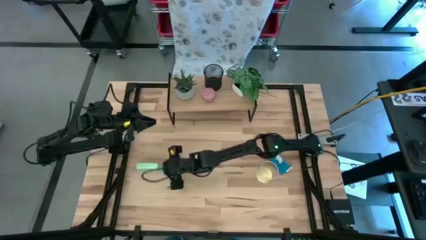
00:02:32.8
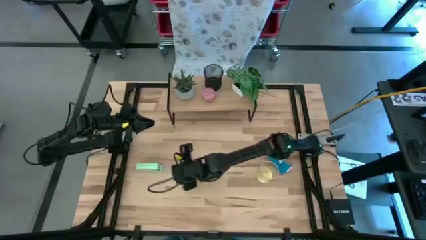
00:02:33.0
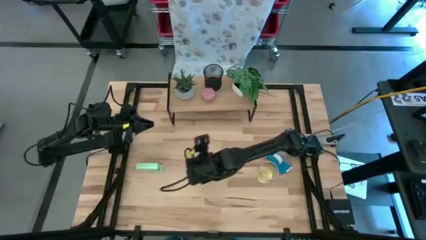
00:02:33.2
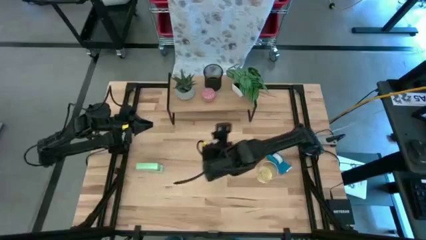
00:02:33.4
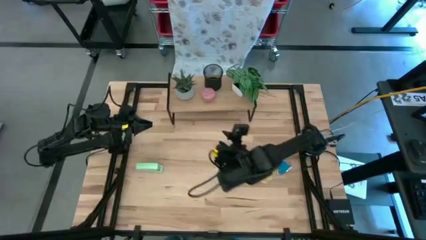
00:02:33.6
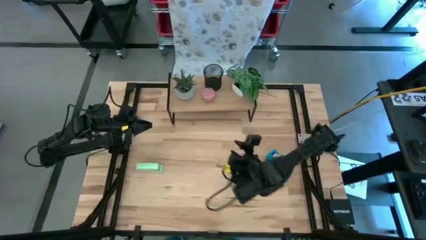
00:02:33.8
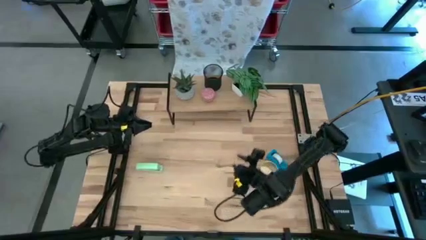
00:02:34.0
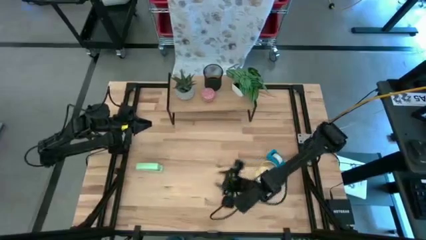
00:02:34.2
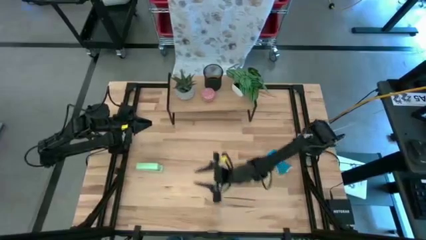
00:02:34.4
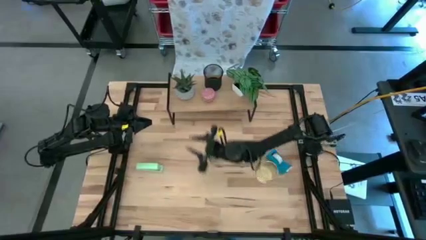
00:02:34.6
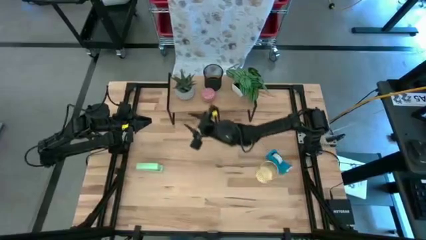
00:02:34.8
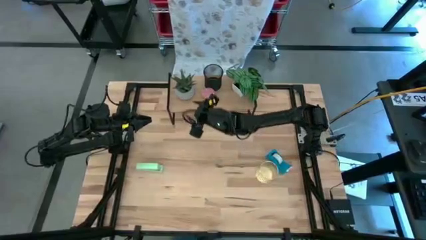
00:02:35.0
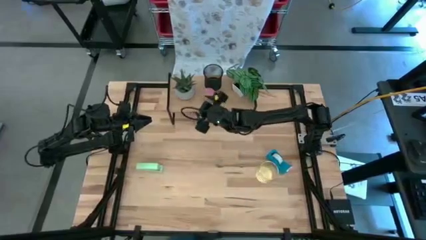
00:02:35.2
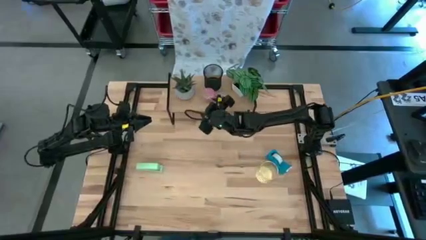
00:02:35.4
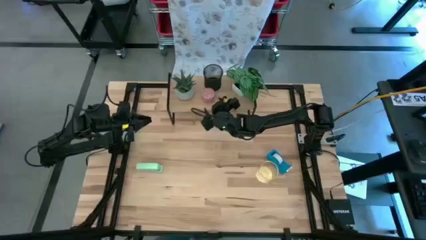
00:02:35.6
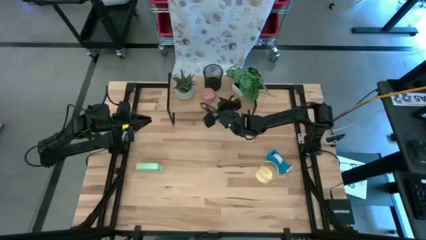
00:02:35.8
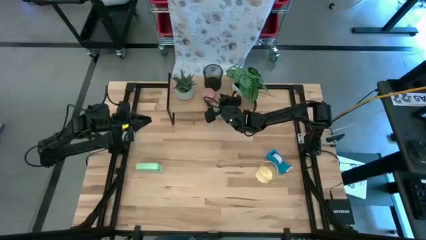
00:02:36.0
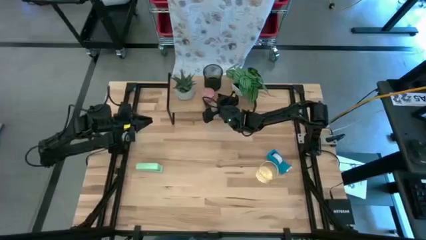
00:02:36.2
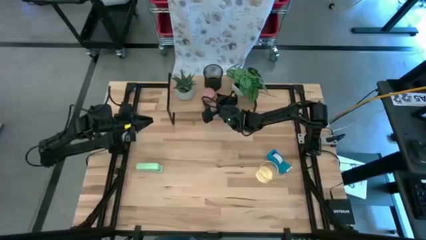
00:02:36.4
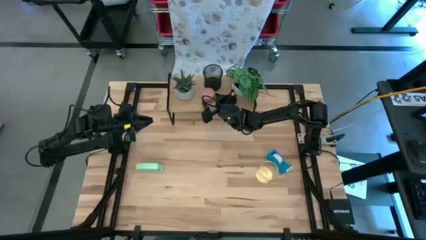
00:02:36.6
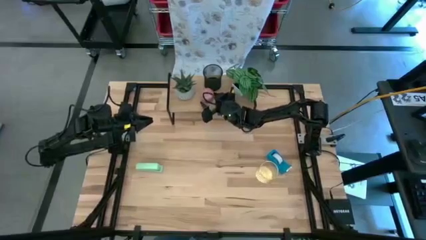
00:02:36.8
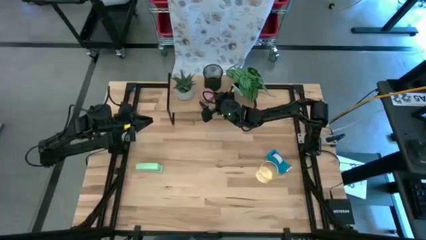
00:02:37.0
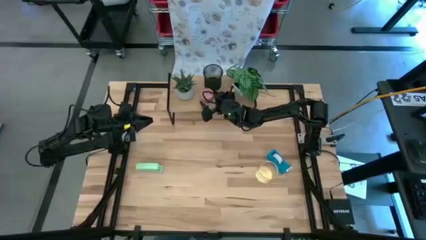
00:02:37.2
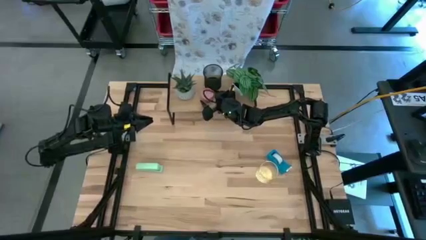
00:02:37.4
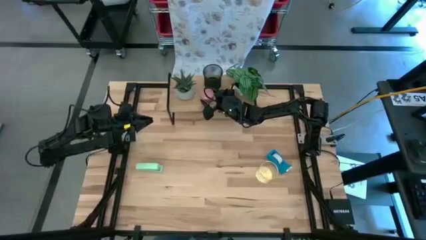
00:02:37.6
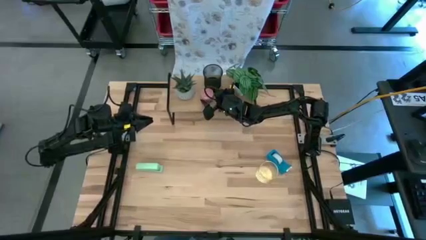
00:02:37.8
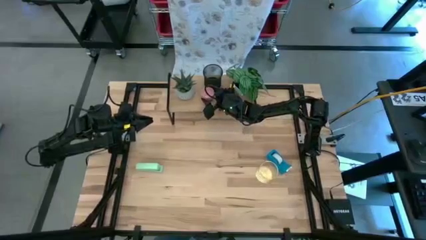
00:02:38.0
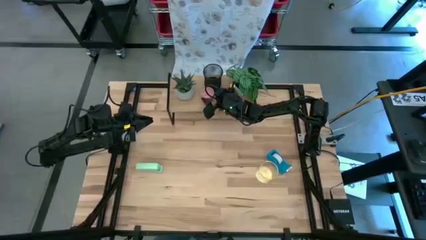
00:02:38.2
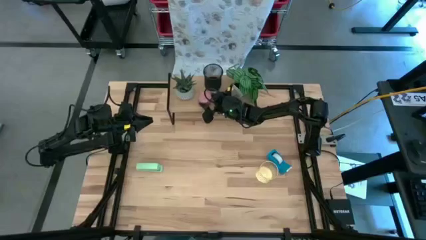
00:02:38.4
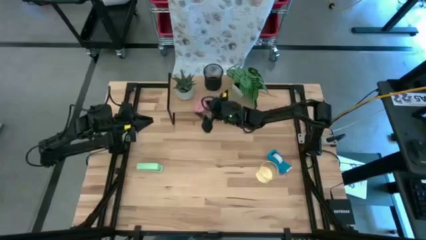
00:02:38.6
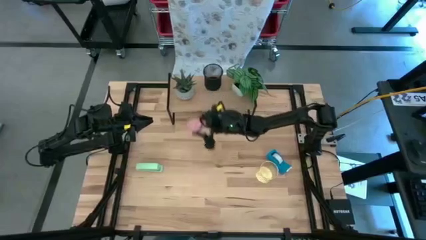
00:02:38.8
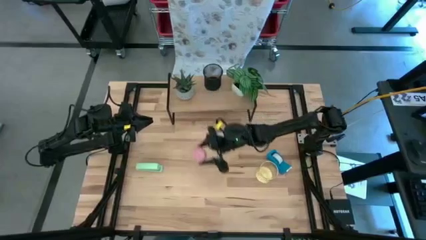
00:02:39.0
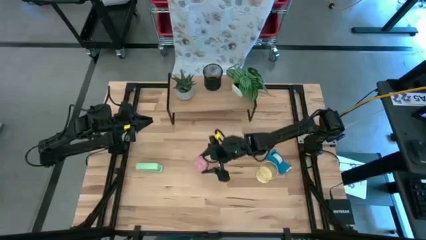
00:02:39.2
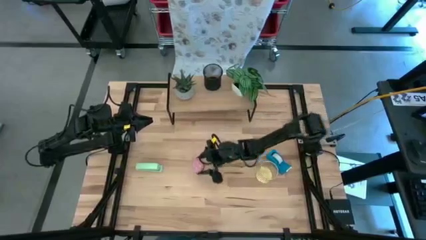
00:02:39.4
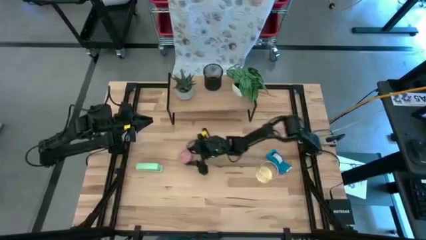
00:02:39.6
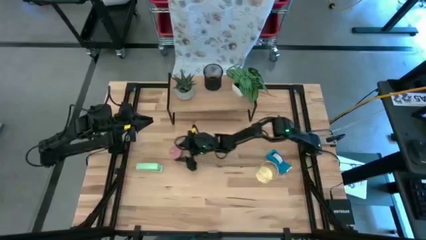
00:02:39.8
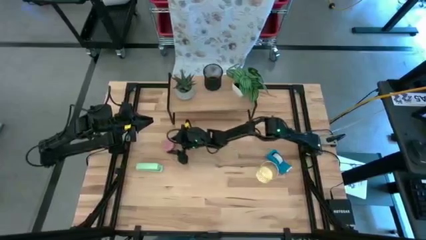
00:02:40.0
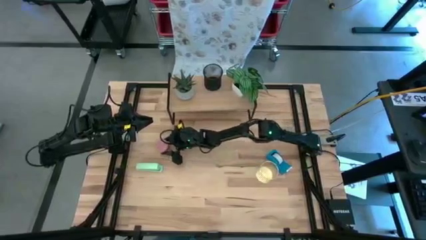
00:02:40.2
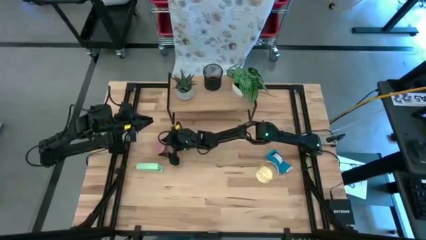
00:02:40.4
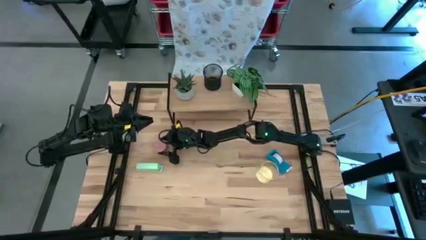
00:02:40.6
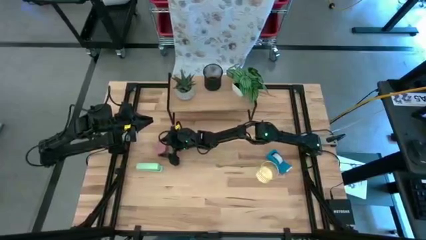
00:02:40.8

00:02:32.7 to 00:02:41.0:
Task: Stock shelves
Remove the pink scented candle on the shelf

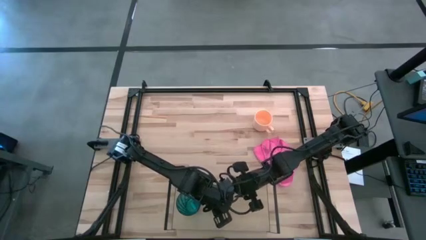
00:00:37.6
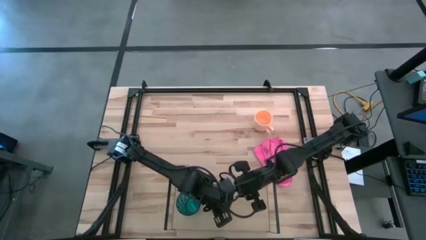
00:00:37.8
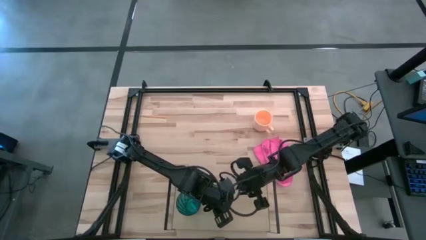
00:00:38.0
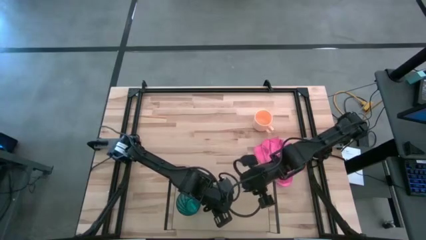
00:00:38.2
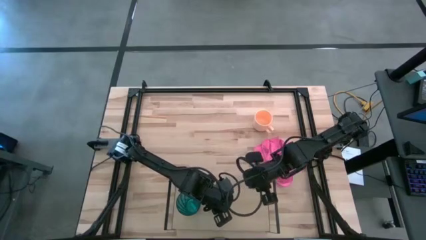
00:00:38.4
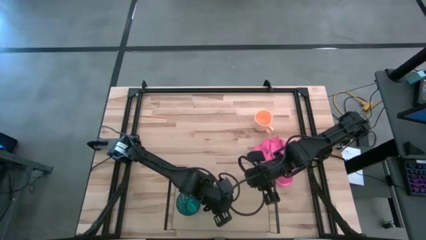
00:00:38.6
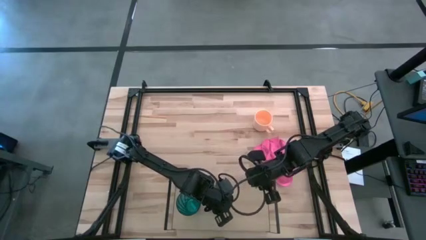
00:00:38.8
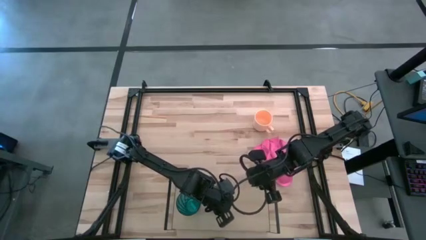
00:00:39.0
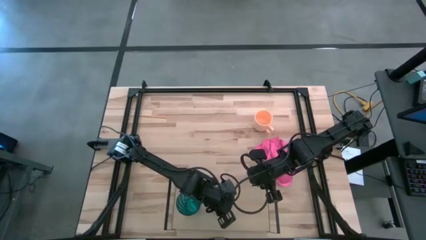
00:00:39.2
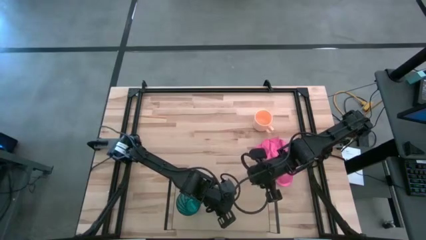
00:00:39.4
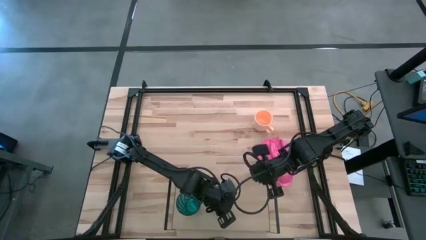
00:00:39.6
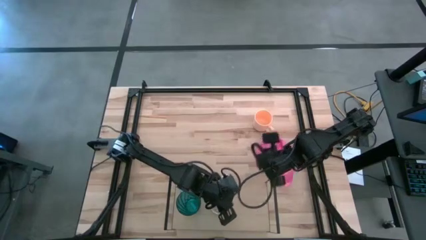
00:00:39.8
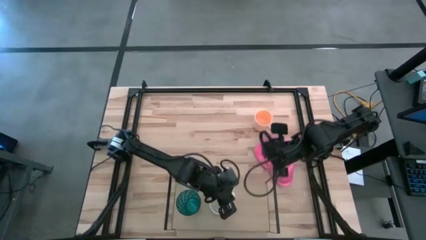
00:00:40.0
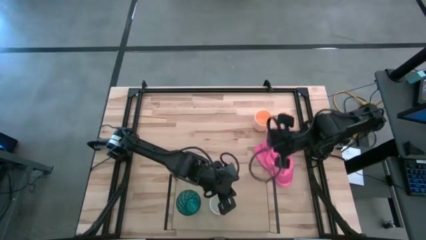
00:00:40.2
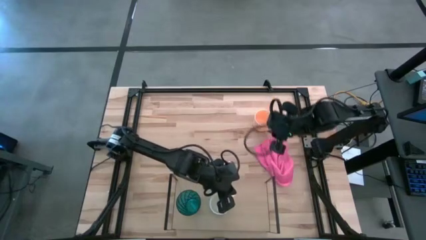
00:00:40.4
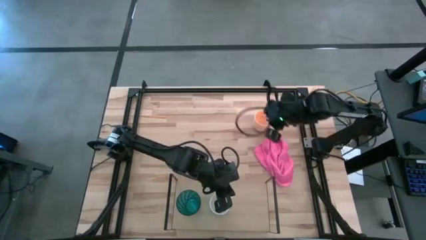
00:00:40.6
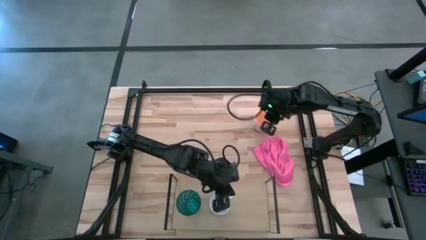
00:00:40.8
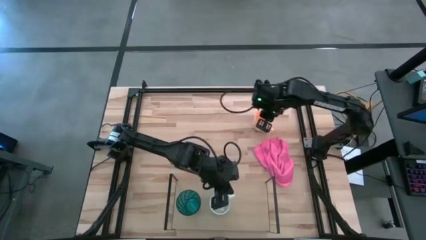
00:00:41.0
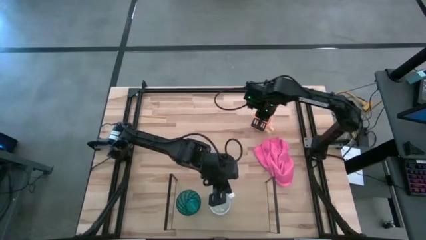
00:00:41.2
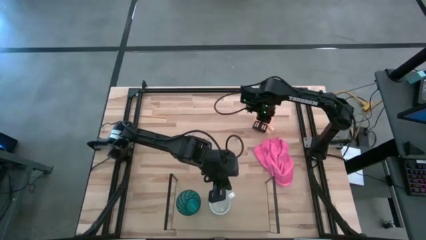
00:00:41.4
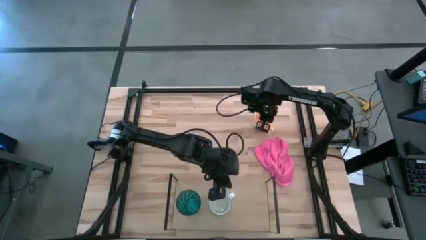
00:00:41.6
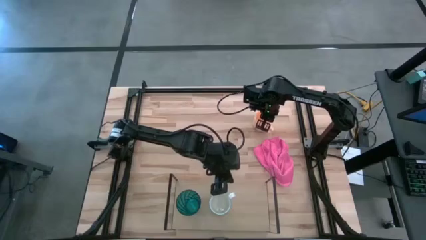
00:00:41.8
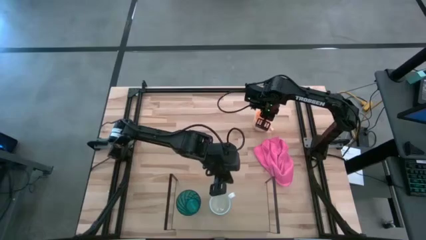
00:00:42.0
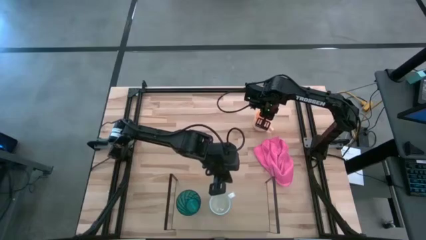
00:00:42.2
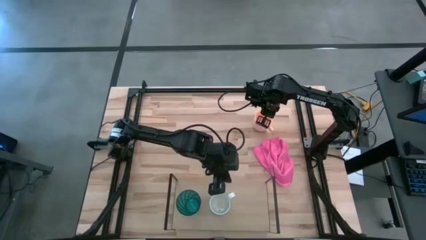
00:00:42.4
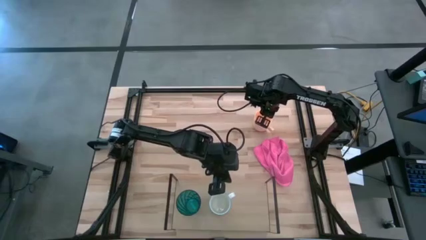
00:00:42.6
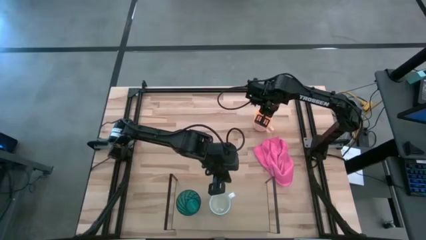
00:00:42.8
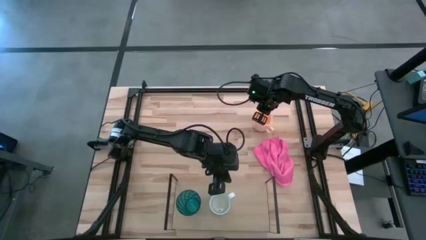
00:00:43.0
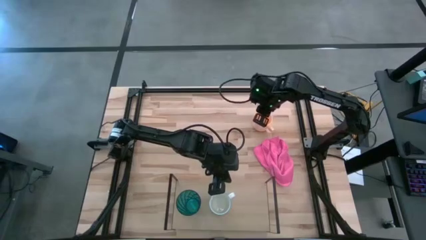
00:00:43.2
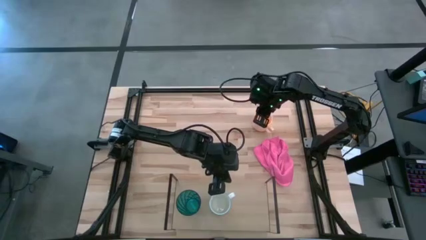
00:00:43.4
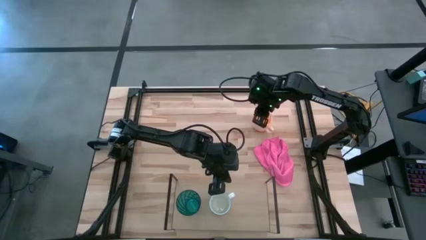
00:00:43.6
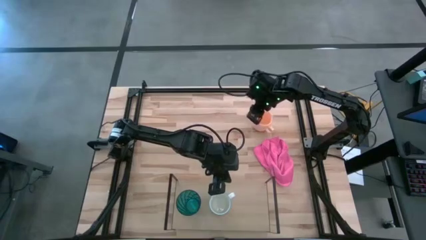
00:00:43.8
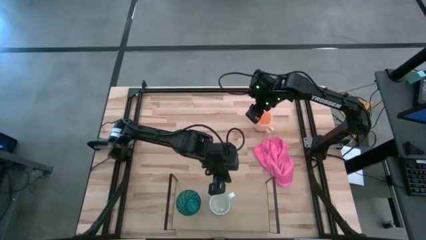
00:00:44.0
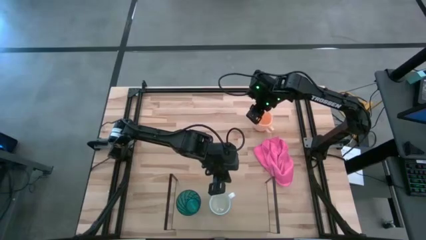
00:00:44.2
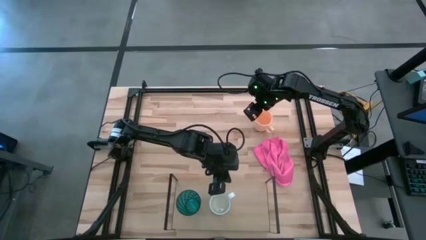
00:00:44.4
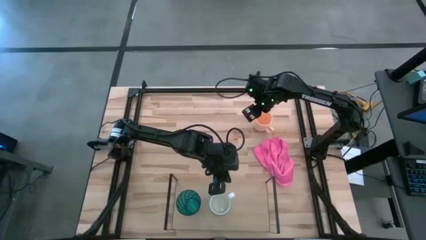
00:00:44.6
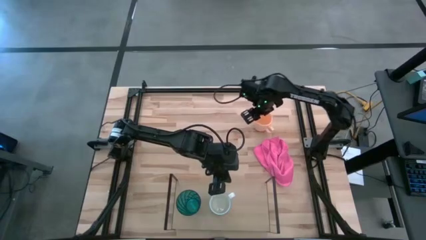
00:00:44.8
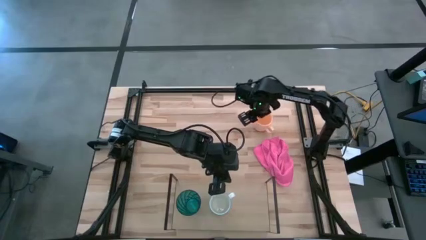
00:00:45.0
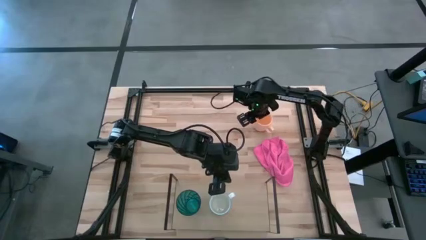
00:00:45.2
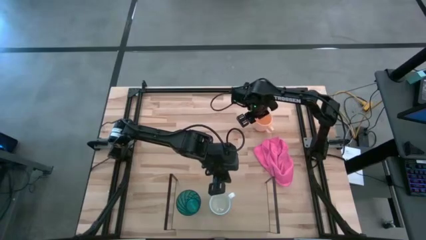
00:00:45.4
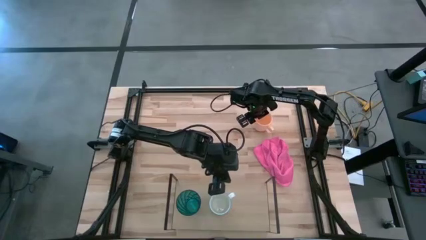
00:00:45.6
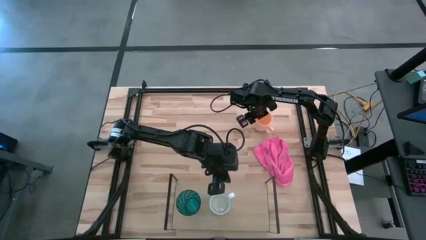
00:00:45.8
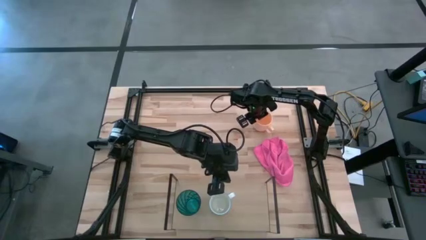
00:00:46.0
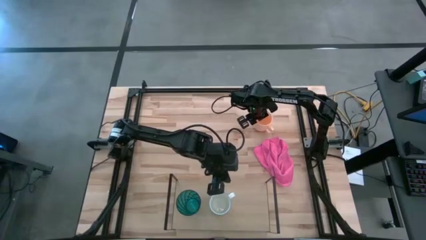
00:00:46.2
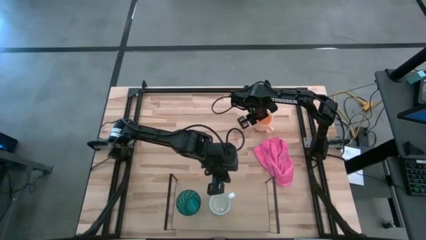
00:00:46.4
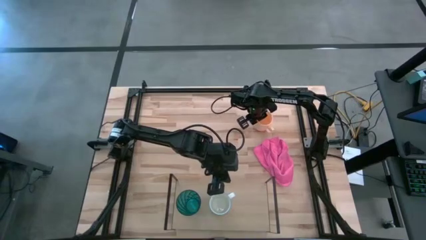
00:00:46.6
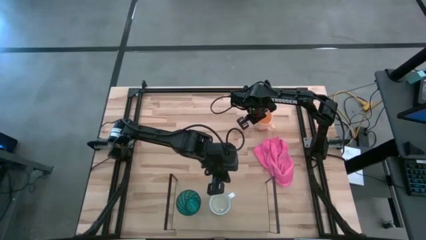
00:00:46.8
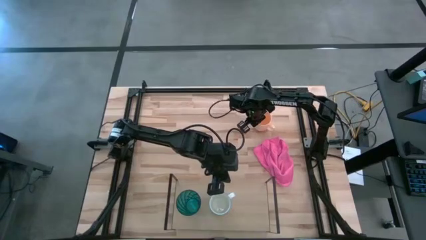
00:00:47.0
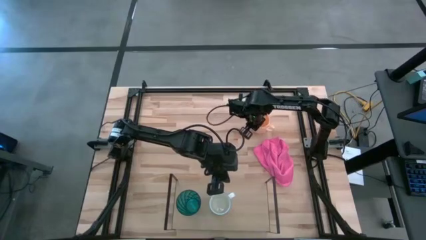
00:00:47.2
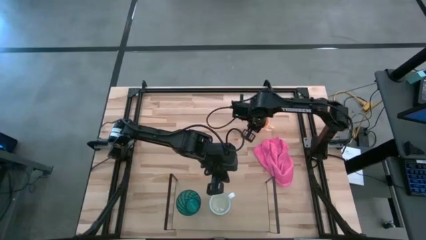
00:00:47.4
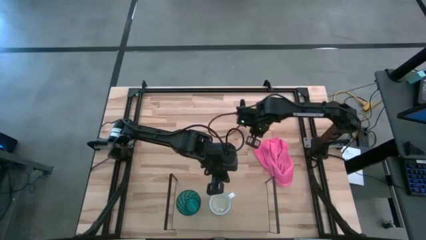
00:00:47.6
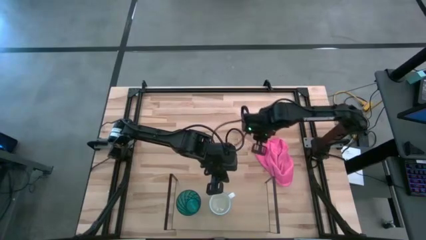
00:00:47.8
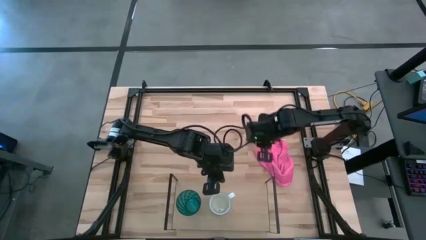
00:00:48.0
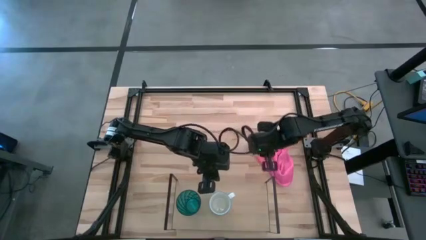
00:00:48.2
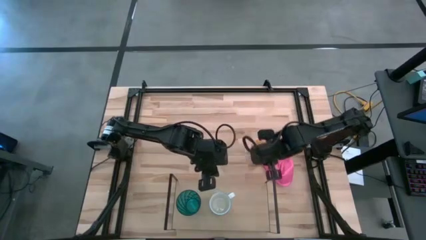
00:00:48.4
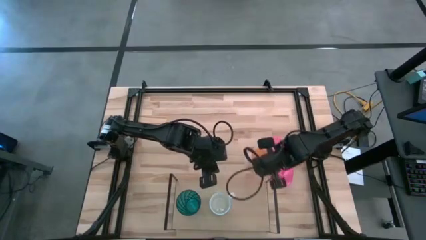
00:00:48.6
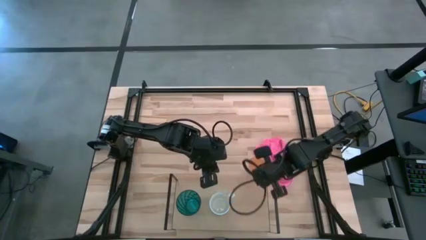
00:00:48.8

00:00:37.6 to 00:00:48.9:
Task: Stack small to large cups/mugs on shelf
Put the orange mug on the shelf
